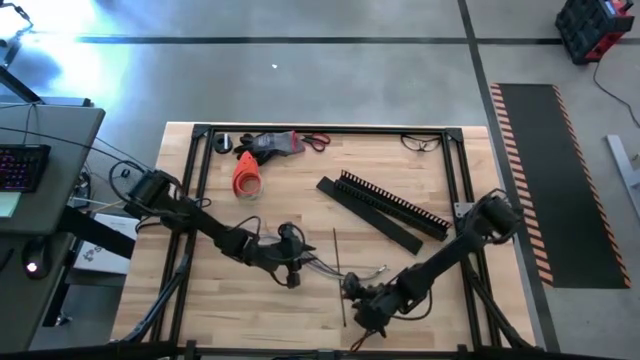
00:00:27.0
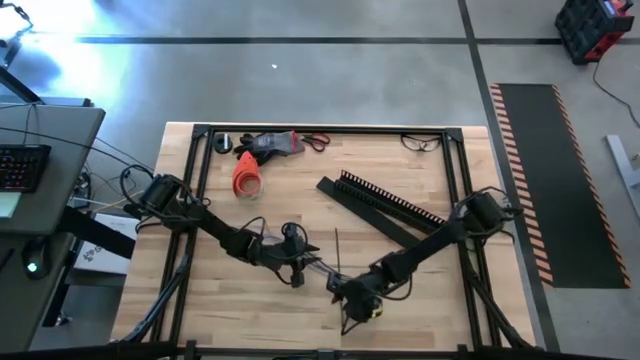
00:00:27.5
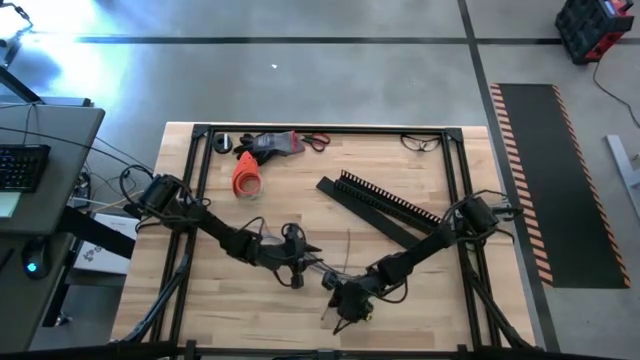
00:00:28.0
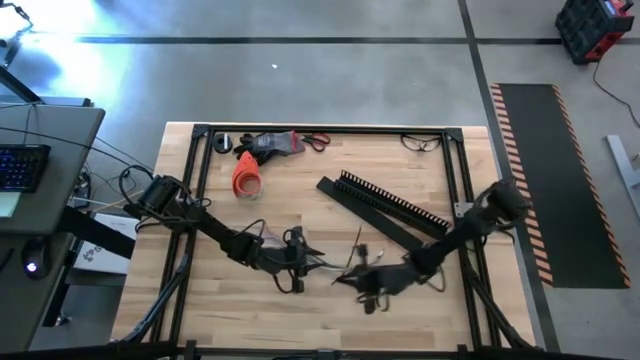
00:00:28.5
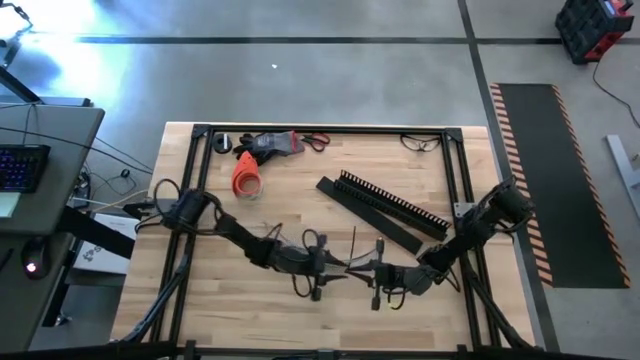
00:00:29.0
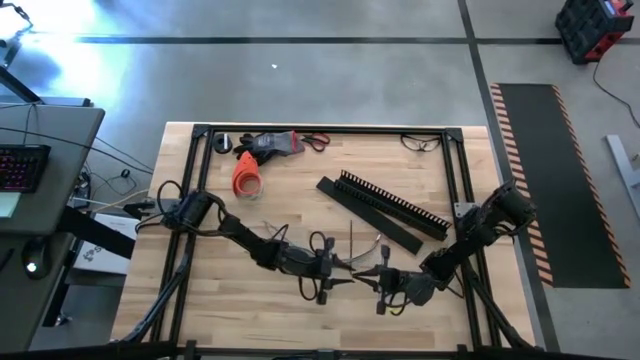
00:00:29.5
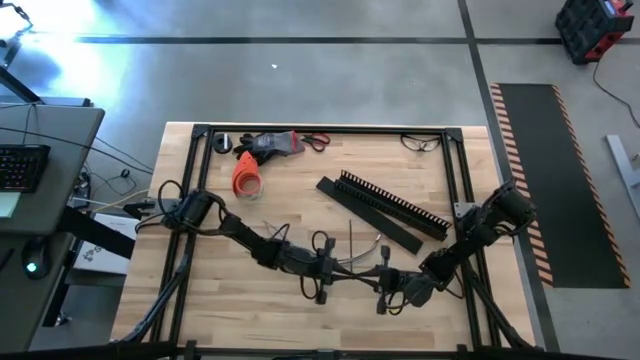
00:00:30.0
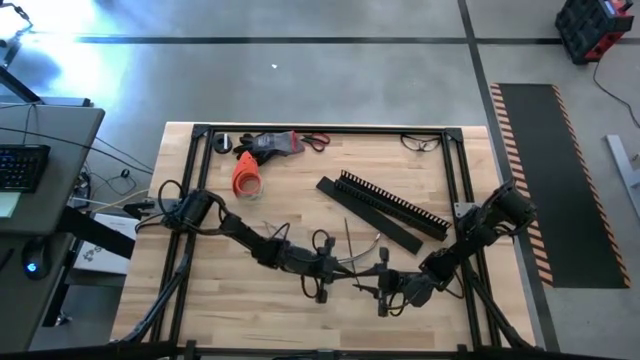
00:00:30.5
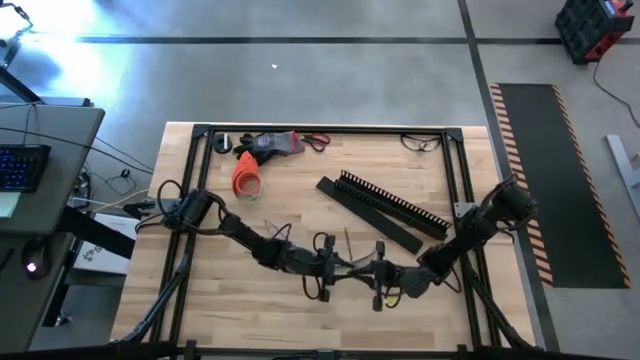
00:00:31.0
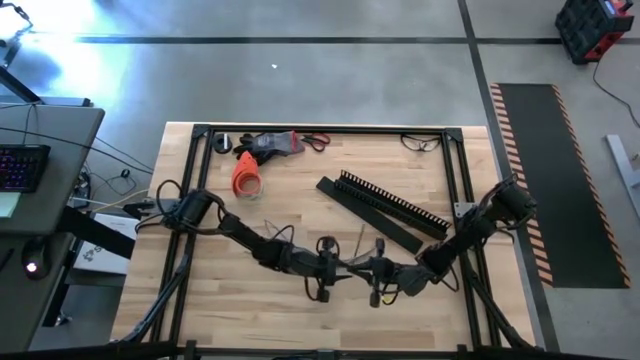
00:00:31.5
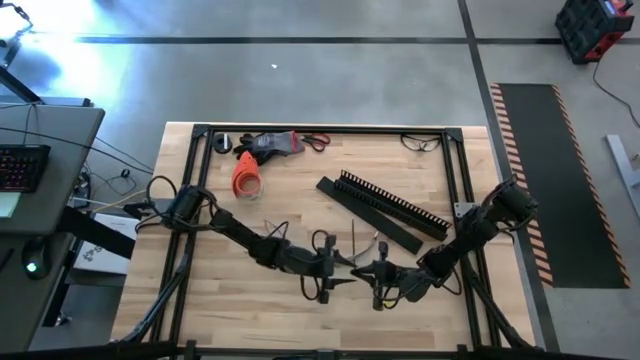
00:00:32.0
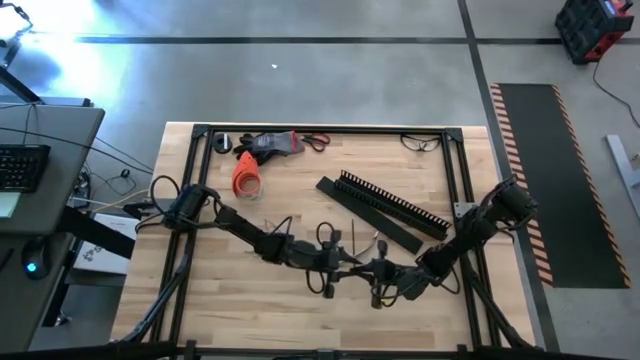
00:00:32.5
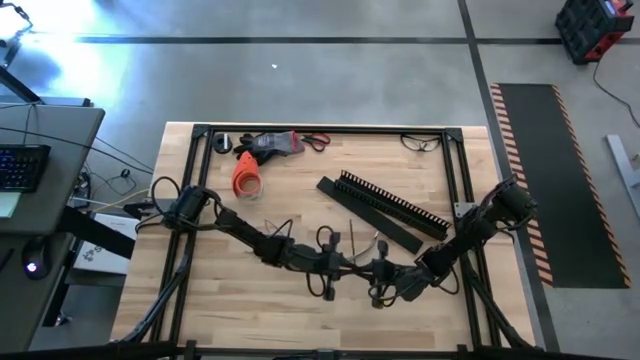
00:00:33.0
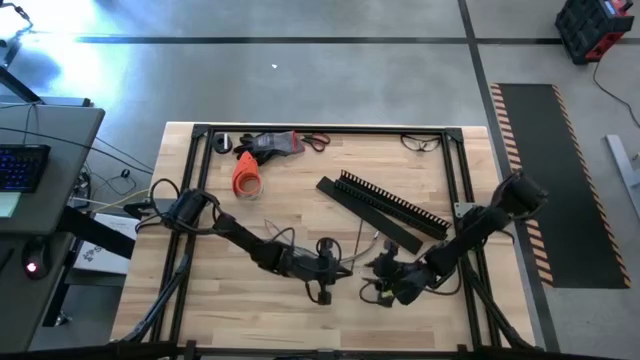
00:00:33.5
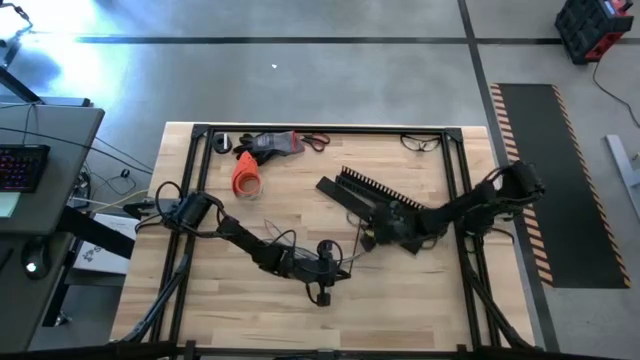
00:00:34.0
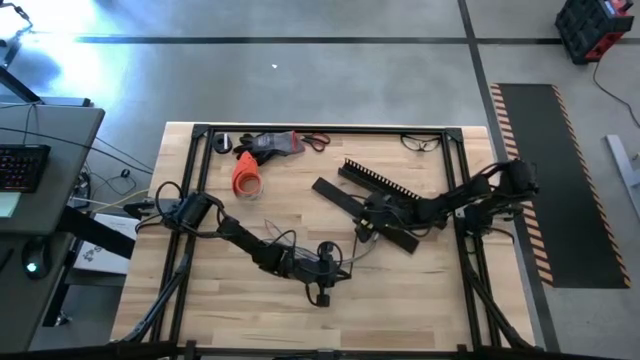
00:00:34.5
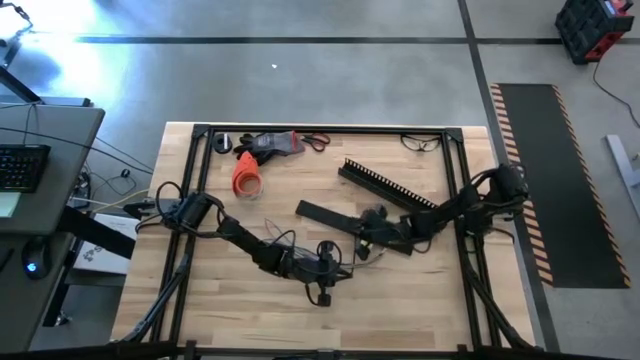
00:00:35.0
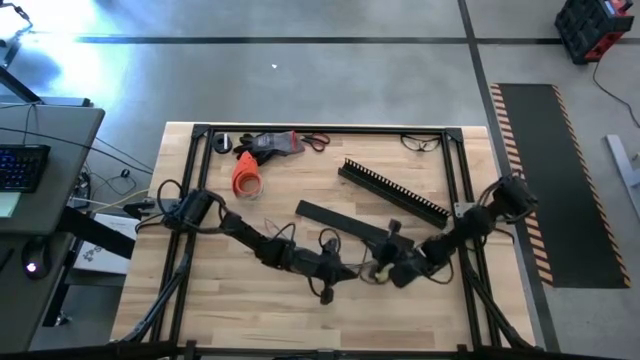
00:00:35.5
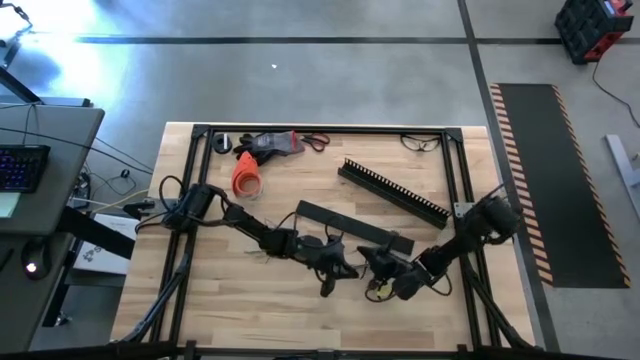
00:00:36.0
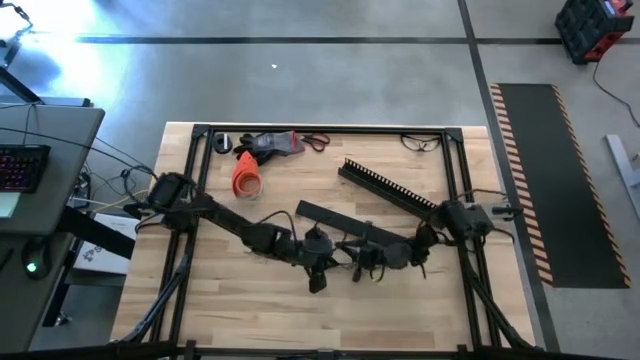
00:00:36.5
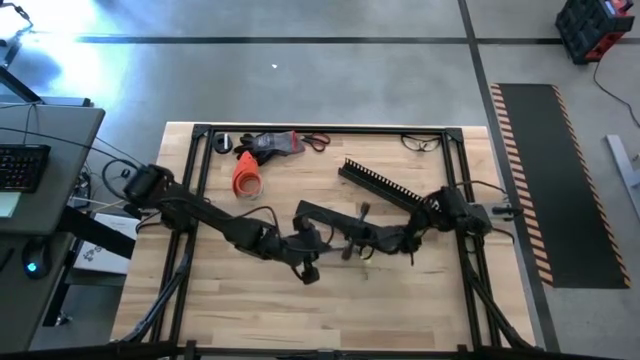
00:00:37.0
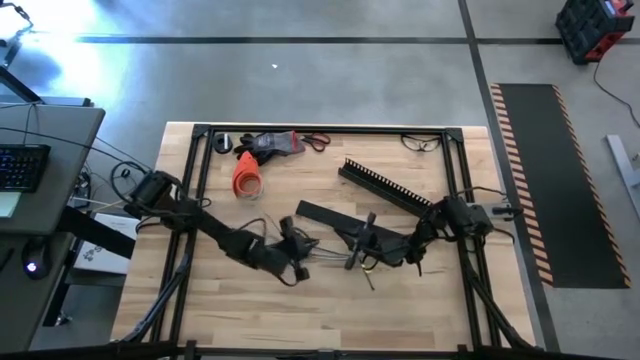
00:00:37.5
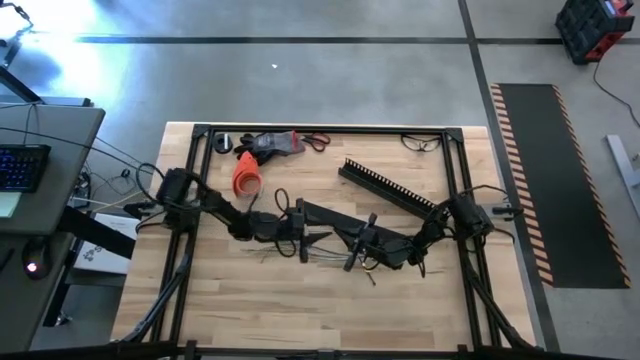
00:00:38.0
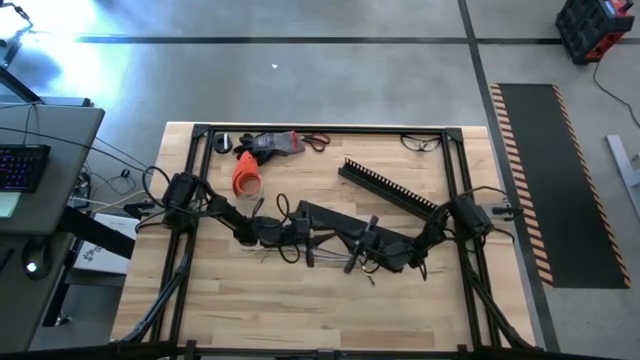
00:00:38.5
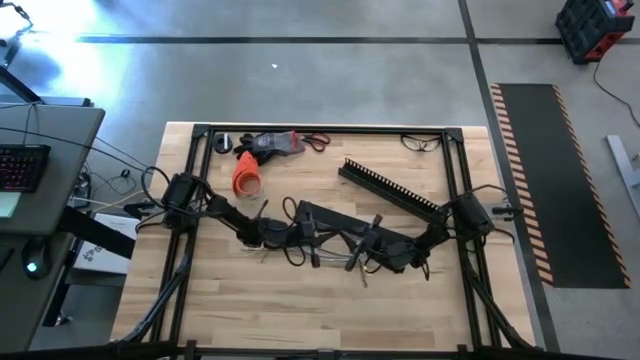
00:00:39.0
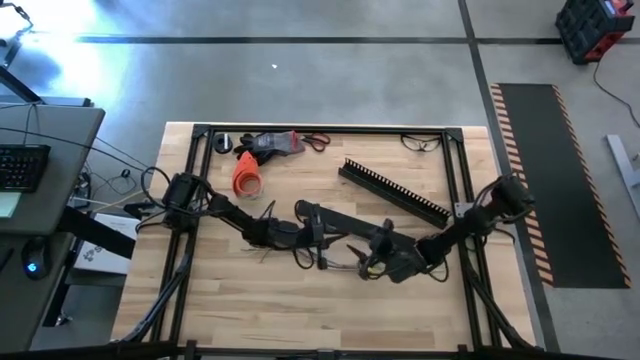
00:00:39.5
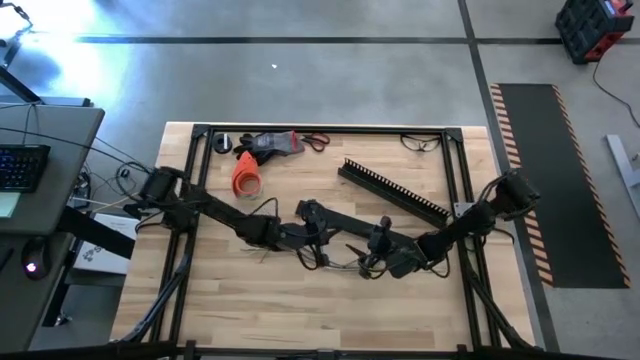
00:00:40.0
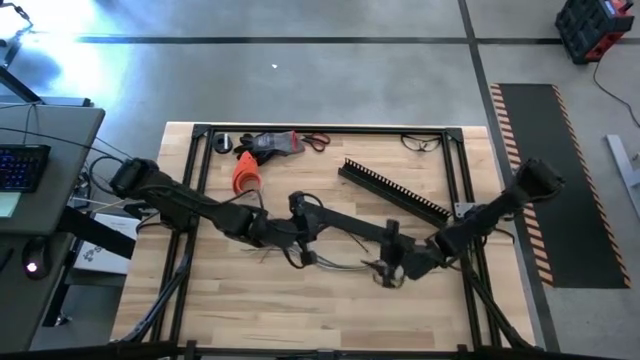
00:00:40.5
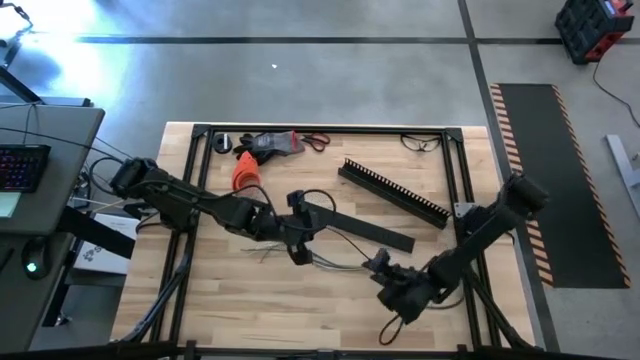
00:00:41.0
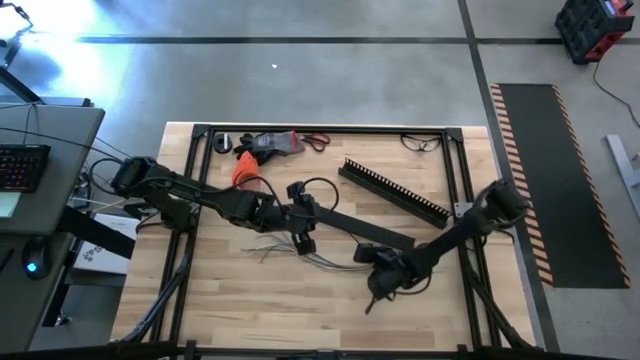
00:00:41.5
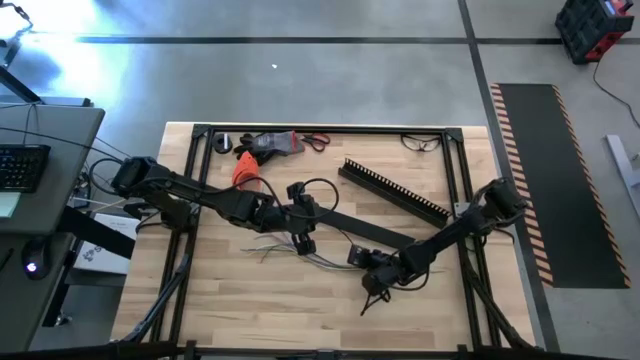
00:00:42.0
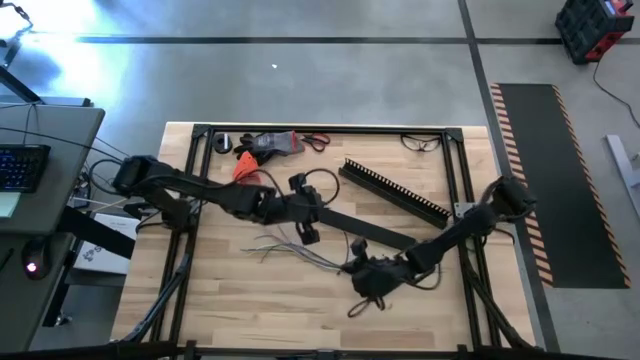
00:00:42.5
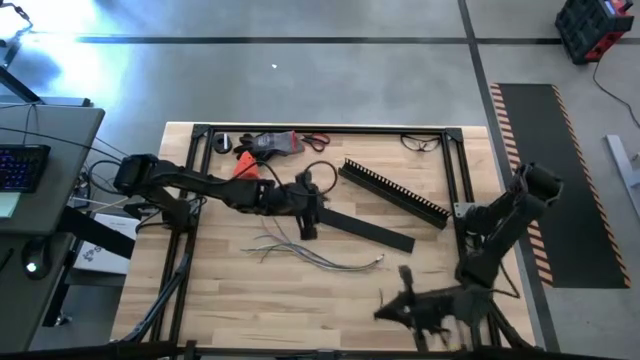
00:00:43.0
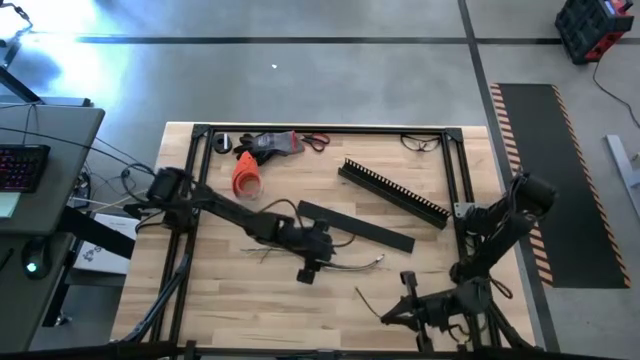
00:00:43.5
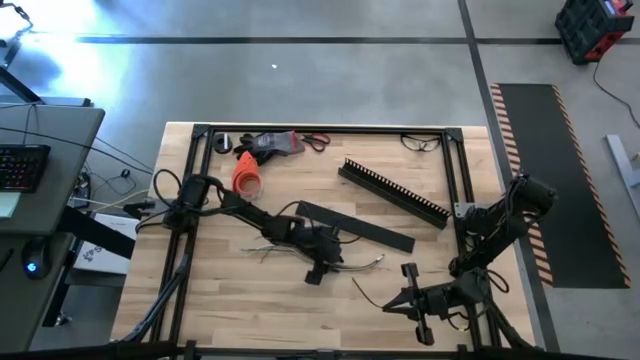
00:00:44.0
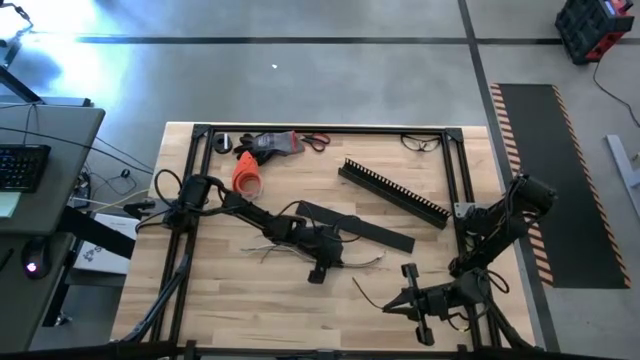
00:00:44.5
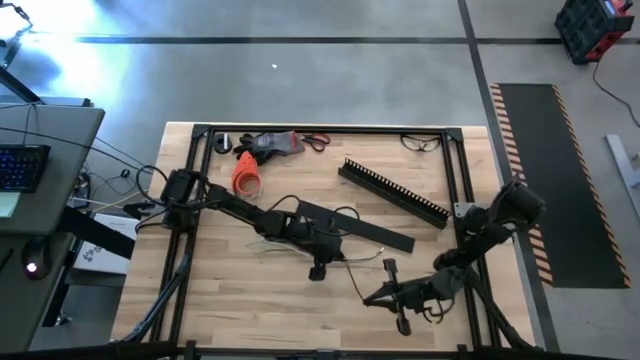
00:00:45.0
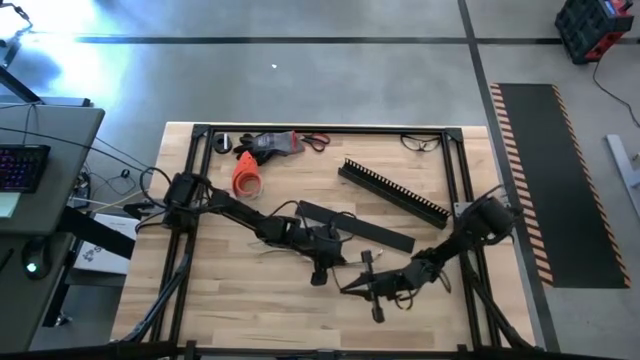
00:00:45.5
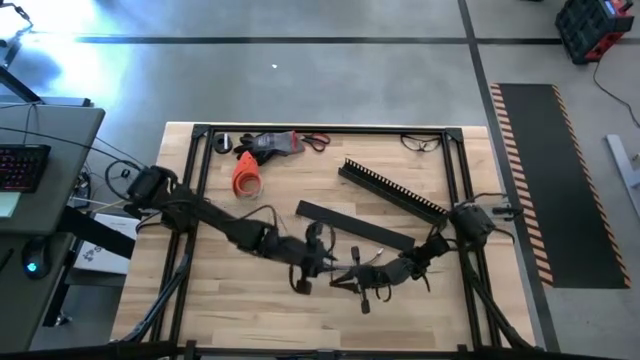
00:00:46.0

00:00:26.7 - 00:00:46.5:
Task: Ziptie cables
Wrap the colored cables with the black zip tie
